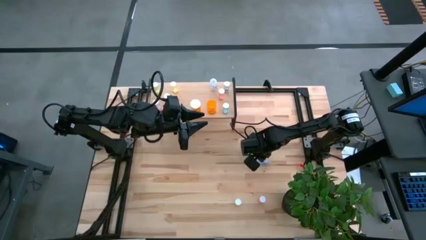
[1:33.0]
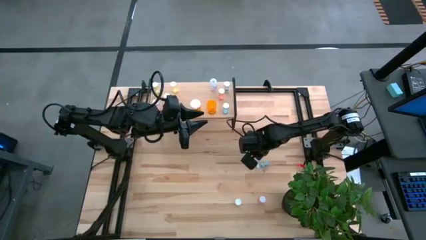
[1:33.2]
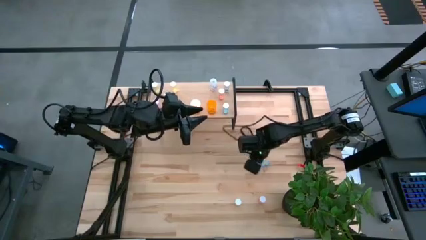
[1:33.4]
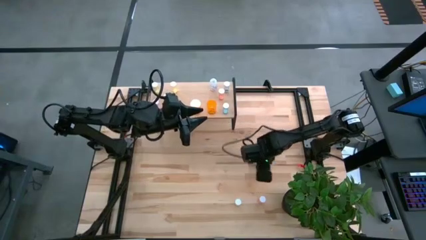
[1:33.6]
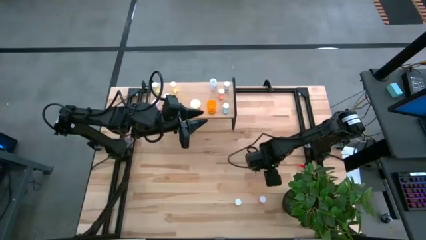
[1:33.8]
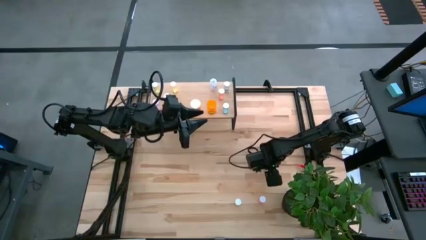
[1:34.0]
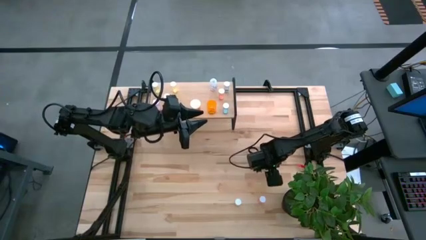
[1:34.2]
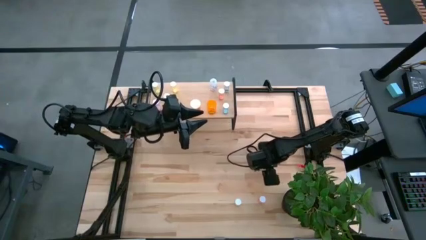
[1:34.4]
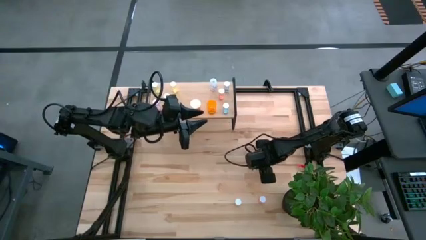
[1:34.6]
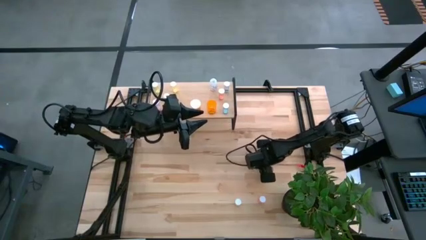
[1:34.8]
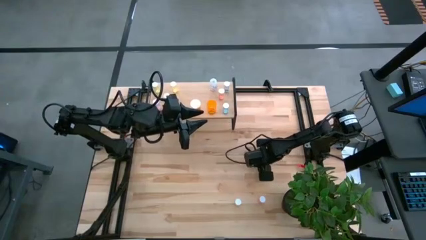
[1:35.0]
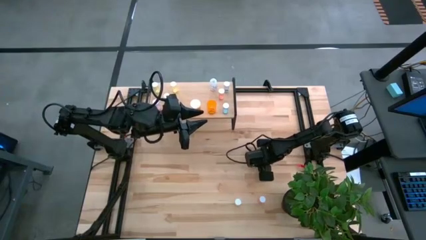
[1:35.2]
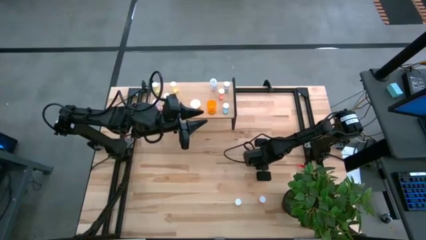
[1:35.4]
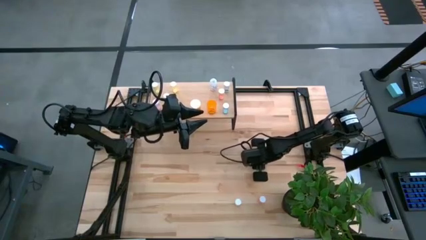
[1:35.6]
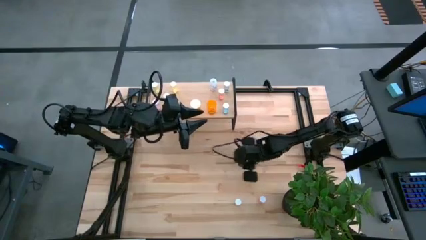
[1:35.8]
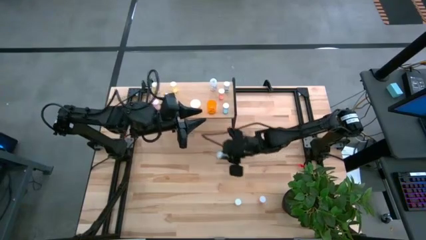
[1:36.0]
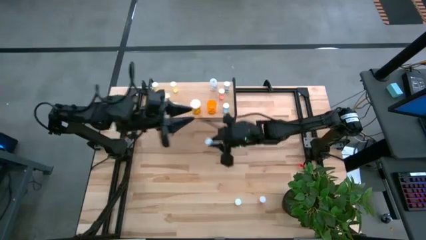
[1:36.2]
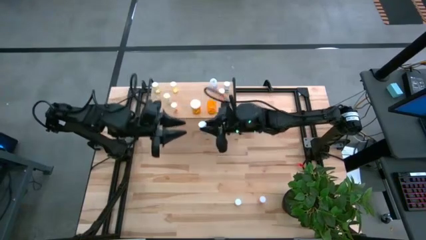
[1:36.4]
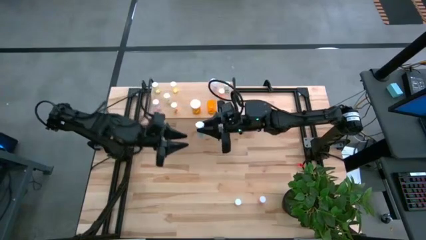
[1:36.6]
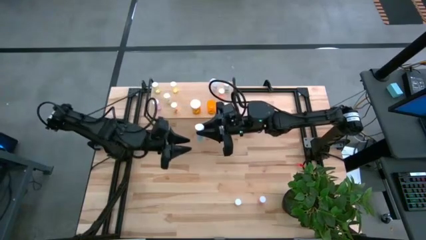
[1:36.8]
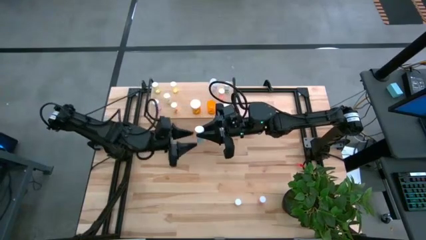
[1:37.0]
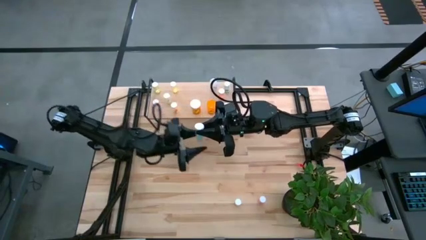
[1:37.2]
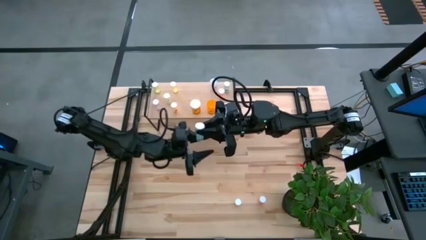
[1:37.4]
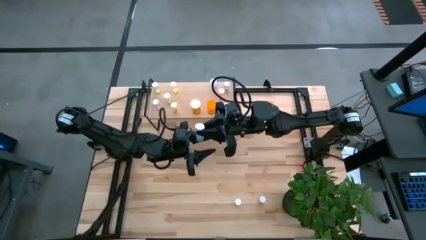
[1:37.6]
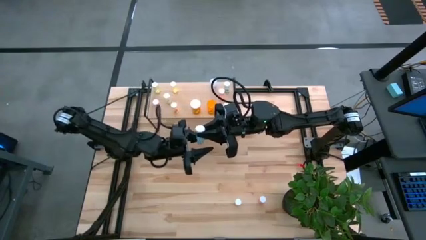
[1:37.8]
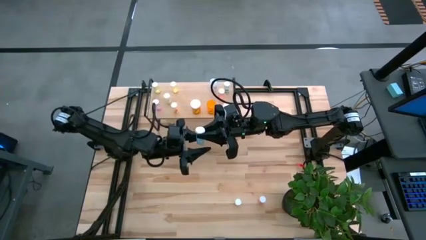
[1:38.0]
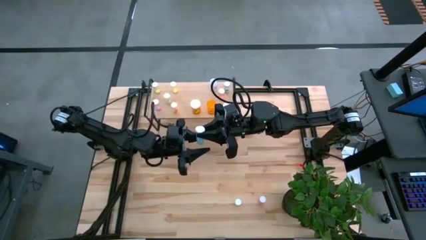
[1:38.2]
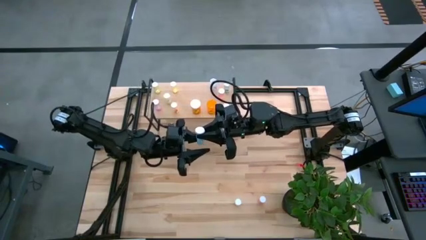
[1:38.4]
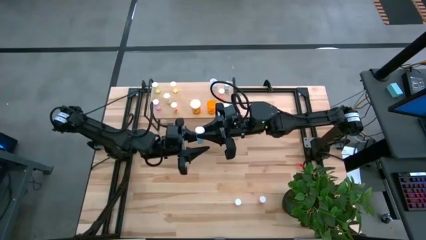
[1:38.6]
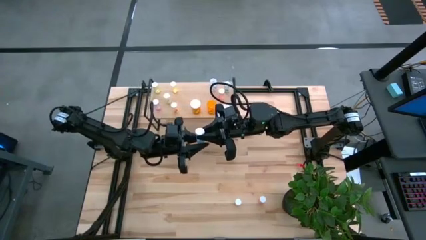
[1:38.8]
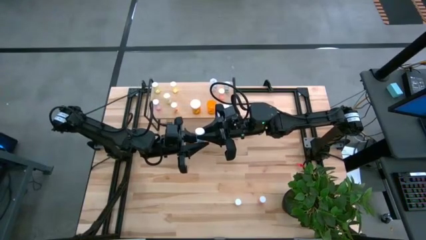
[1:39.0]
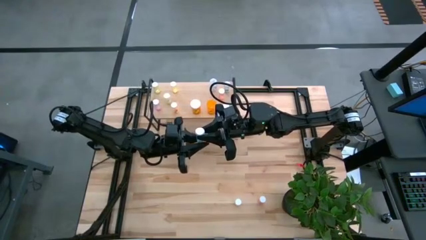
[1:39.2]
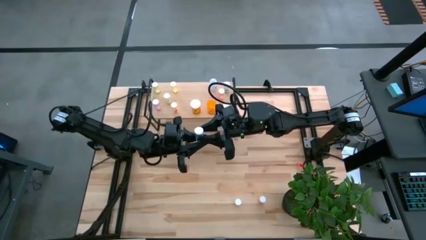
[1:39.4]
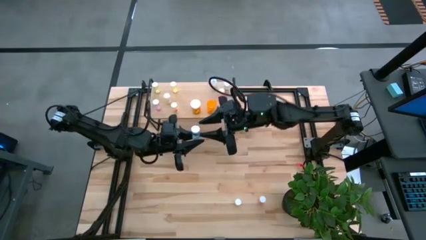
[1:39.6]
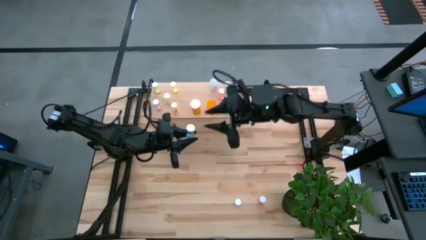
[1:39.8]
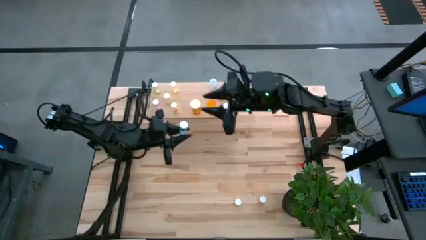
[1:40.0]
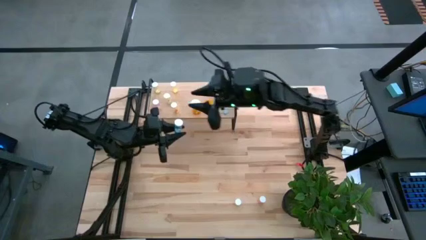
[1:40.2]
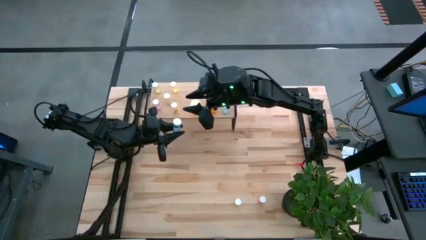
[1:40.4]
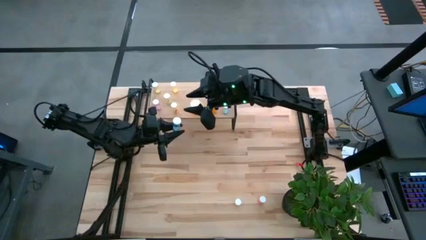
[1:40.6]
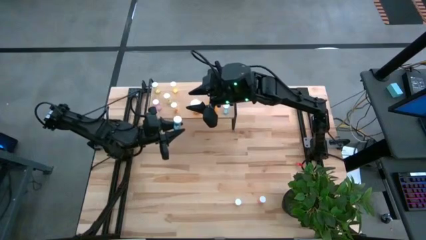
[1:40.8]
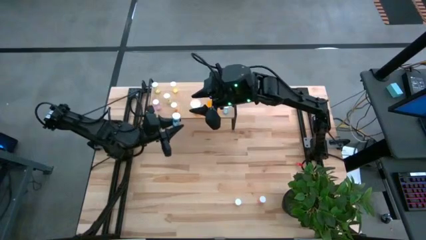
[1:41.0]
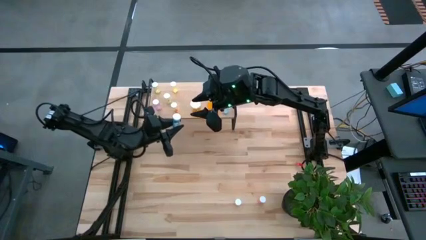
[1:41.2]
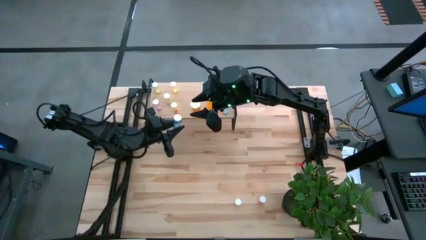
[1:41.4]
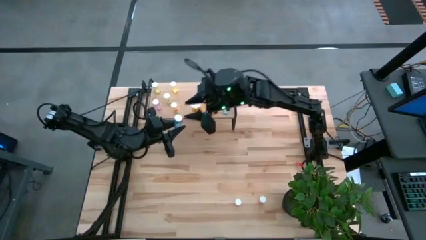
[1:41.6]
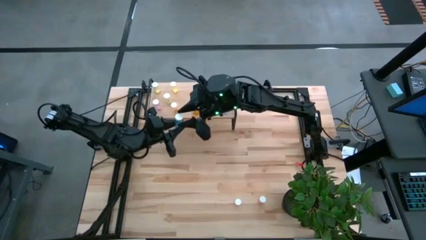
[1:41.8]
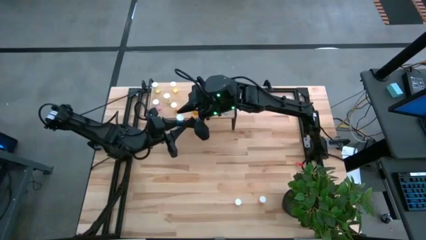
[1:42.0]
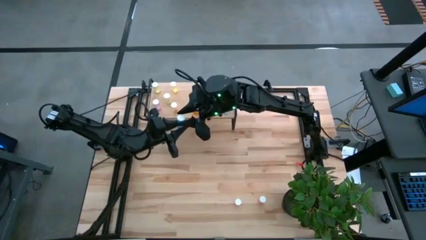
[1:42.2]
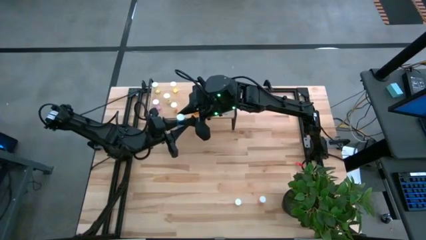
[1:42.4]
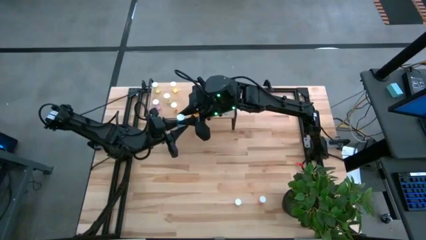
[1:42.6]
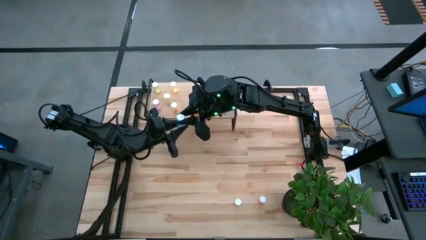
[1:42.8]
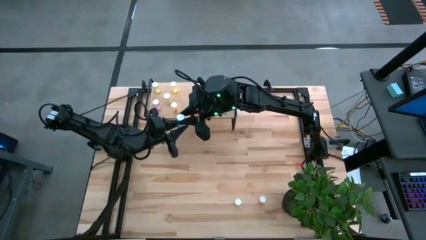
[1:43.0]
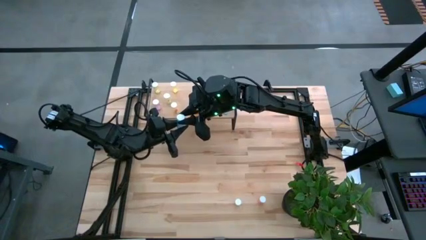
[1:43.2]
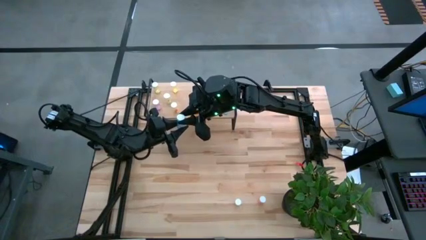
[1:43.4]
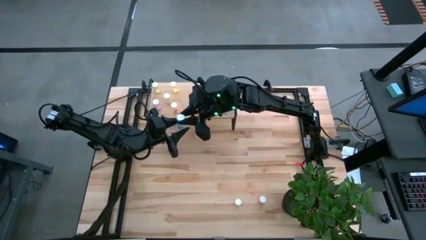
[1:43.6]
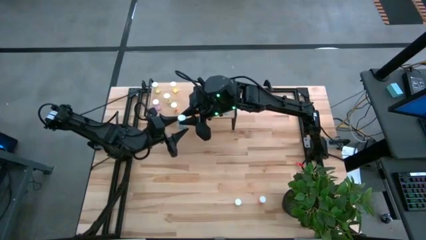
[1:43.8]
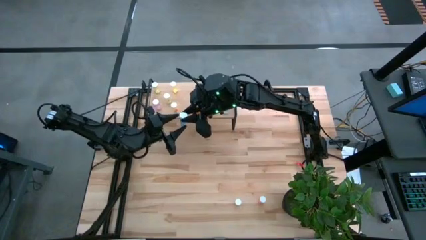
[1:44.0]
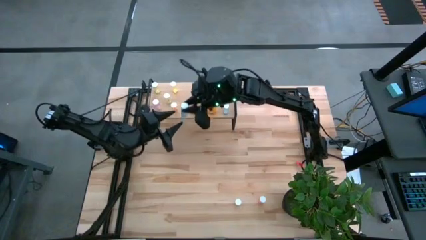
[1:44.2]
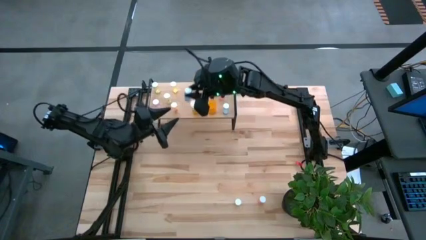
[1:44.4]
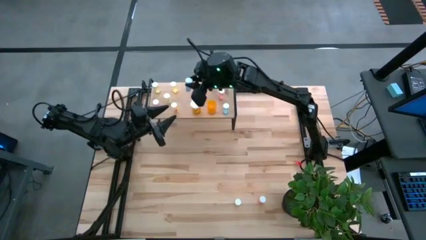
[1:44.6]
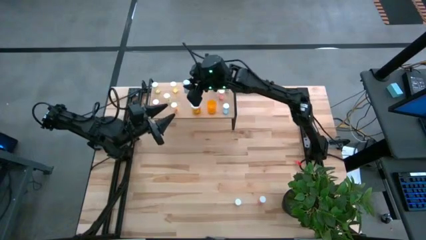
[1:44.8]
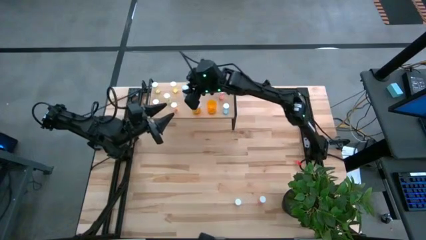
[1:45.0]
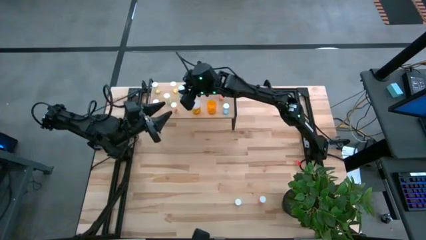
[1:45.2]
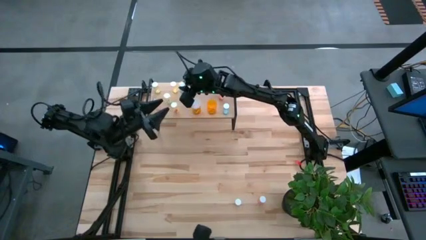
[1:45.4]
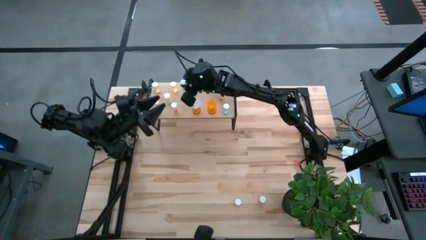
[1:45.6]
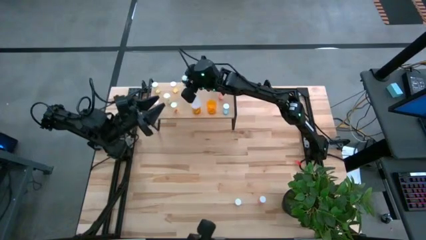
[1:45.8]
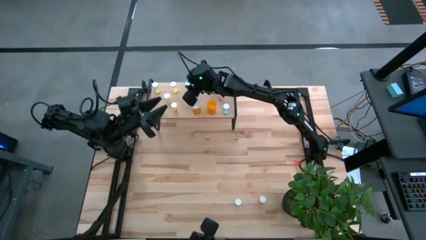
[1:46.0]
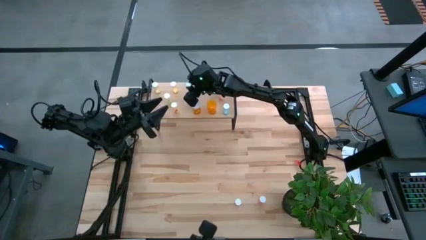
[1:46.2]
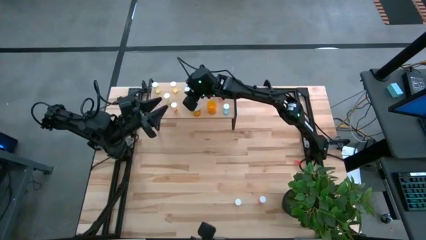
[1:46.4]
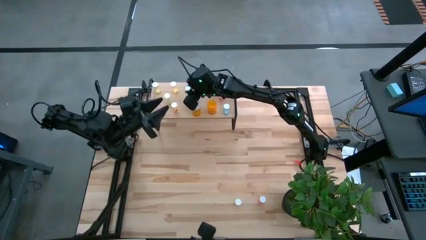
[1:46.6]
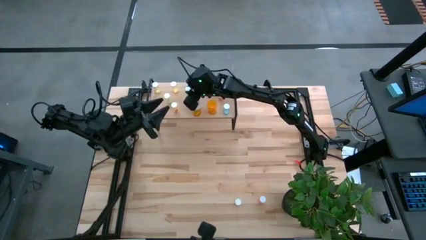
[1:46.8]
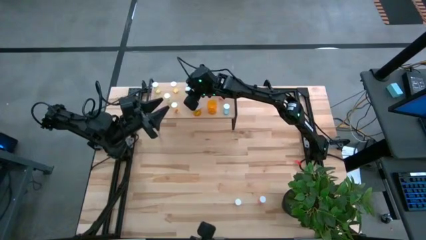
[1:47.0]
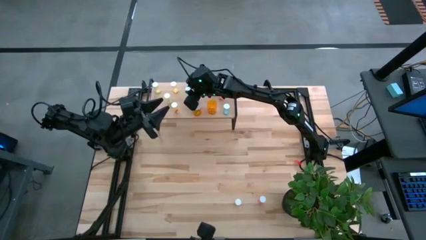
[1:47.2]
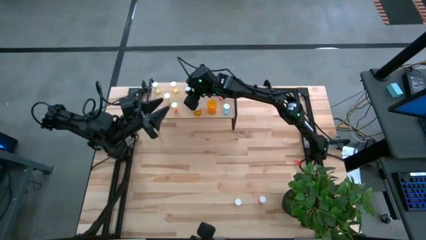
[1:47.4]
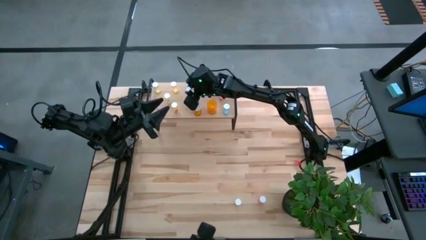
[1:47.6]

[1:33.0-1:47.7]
Task: Pick and place medicine bottles onto shelf by color
Put the blue pill bottle on the shelf
